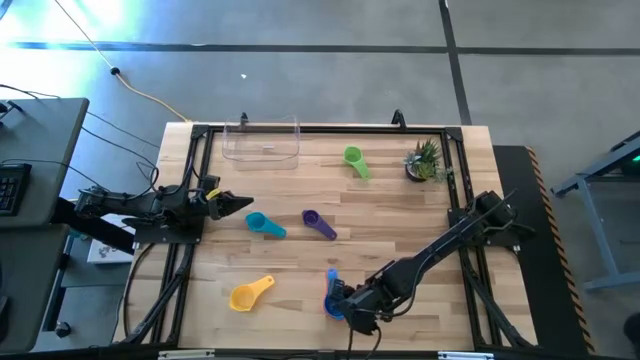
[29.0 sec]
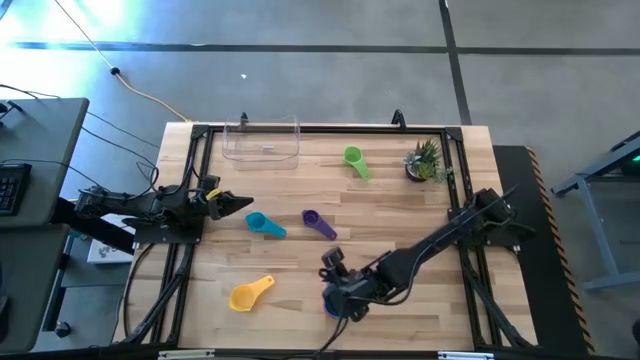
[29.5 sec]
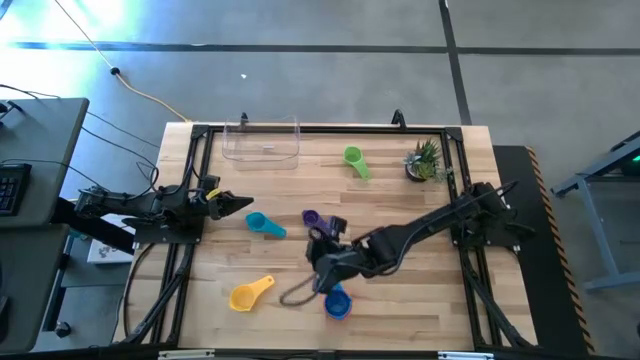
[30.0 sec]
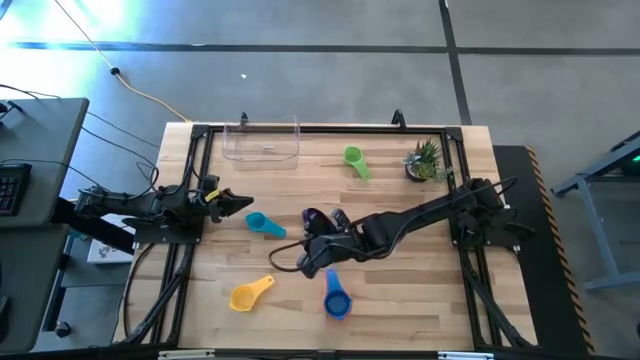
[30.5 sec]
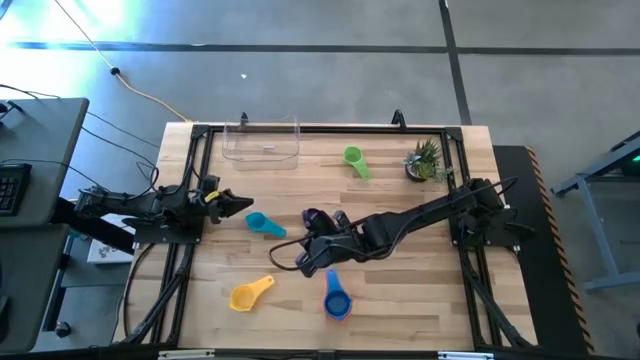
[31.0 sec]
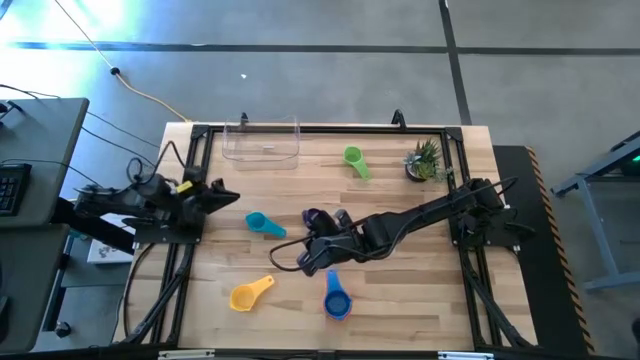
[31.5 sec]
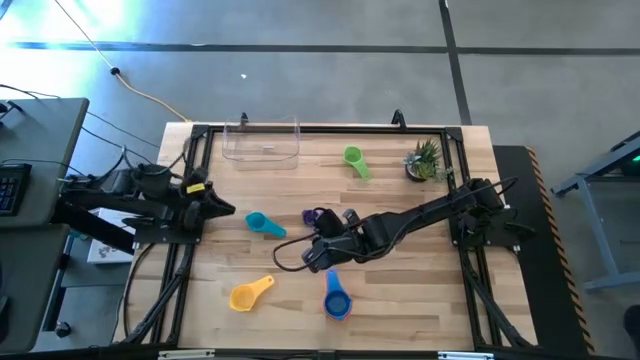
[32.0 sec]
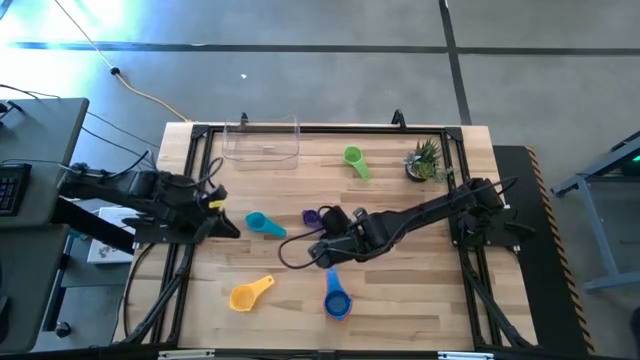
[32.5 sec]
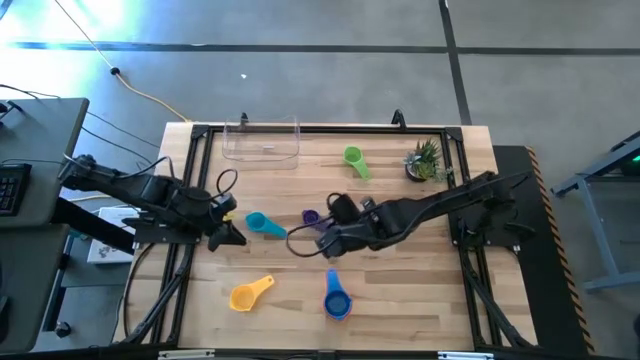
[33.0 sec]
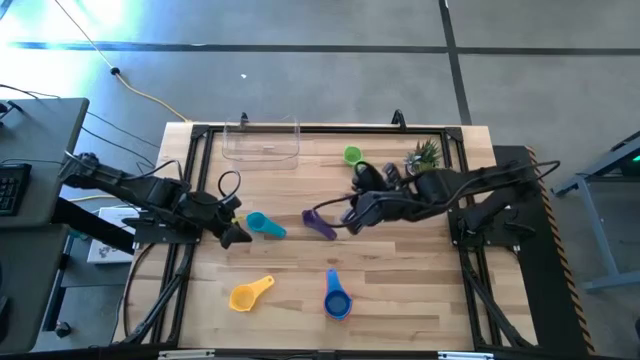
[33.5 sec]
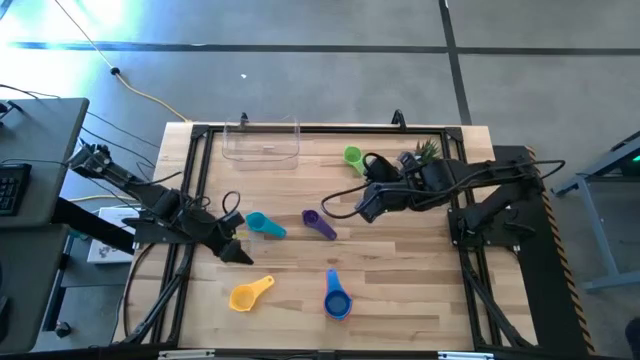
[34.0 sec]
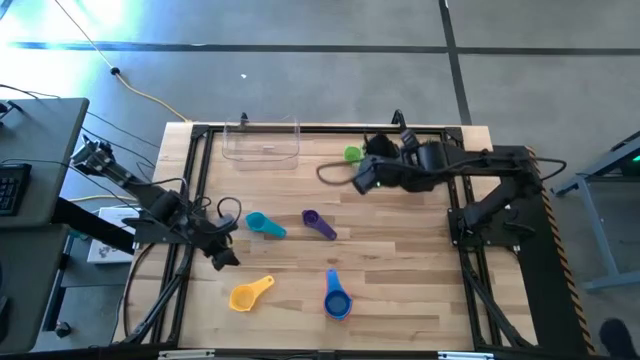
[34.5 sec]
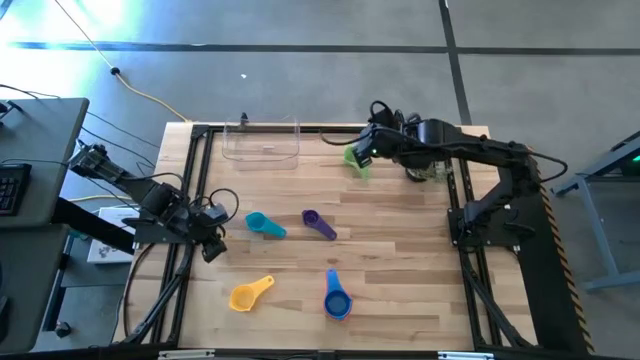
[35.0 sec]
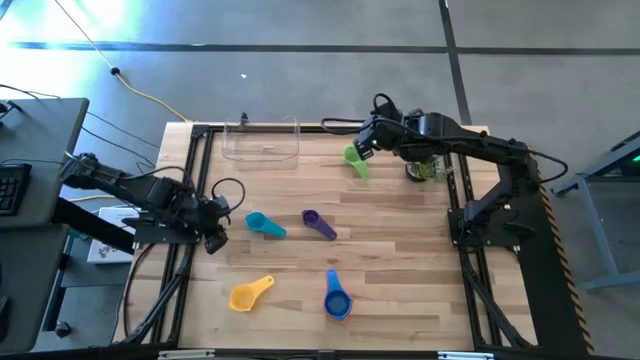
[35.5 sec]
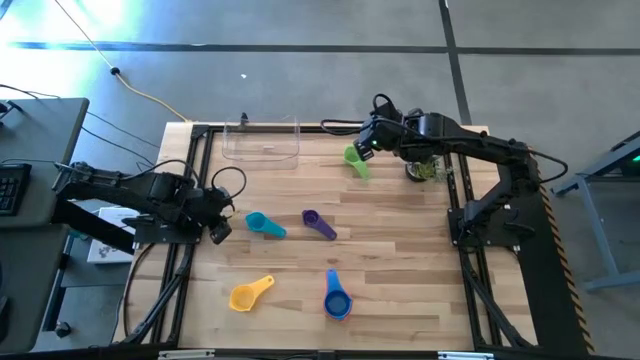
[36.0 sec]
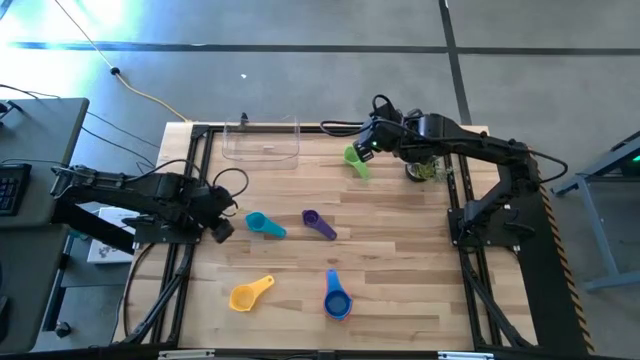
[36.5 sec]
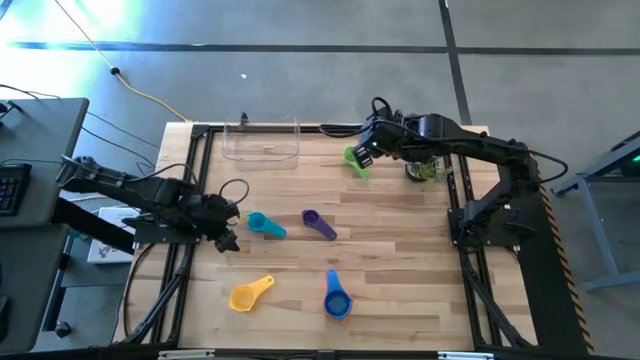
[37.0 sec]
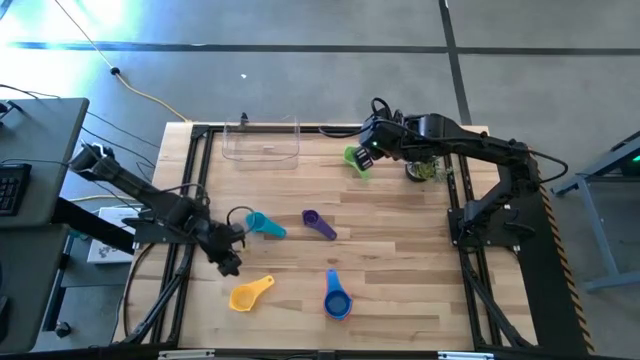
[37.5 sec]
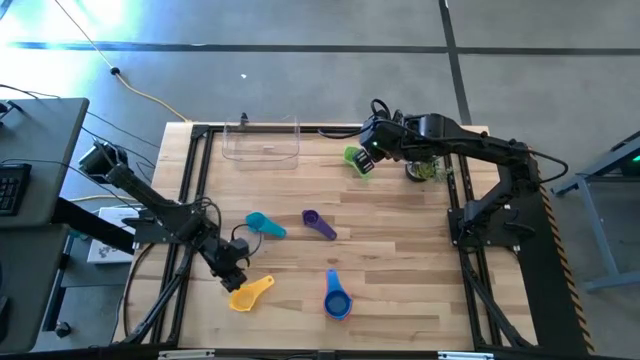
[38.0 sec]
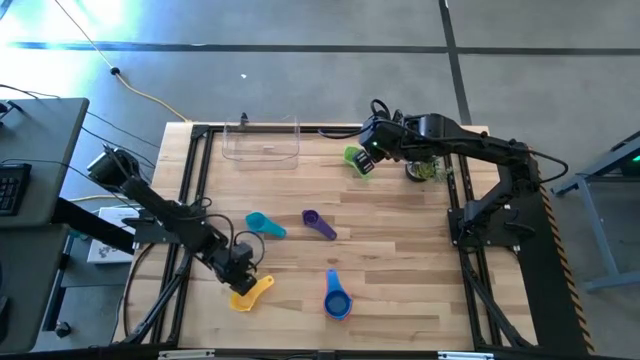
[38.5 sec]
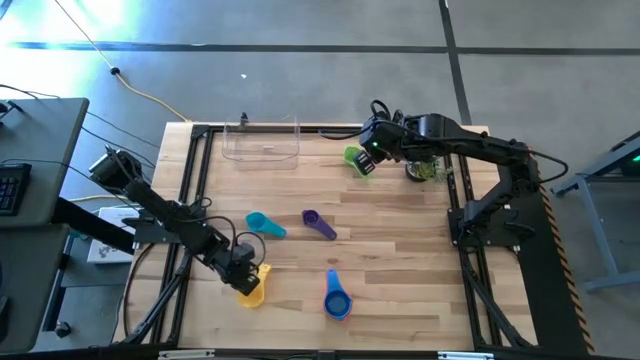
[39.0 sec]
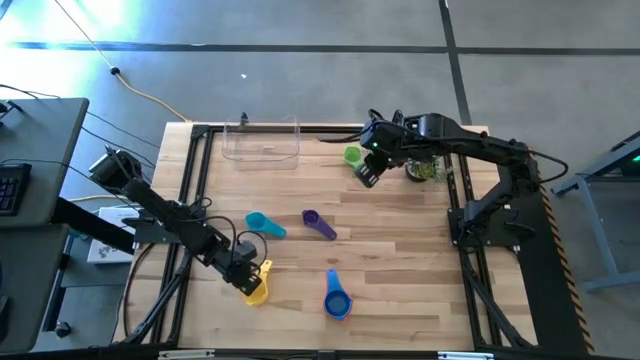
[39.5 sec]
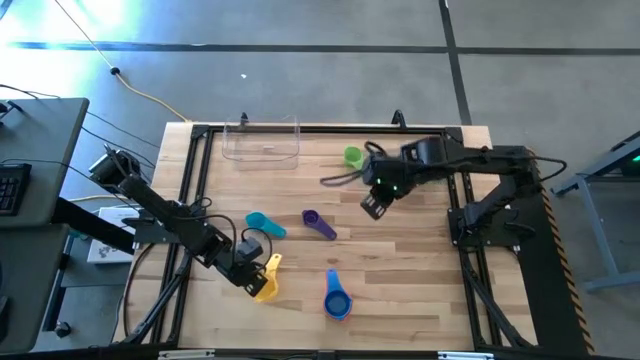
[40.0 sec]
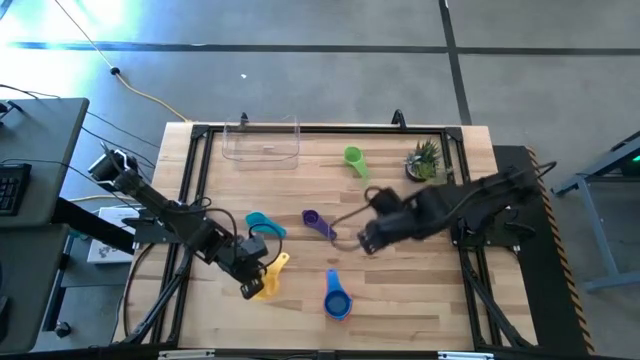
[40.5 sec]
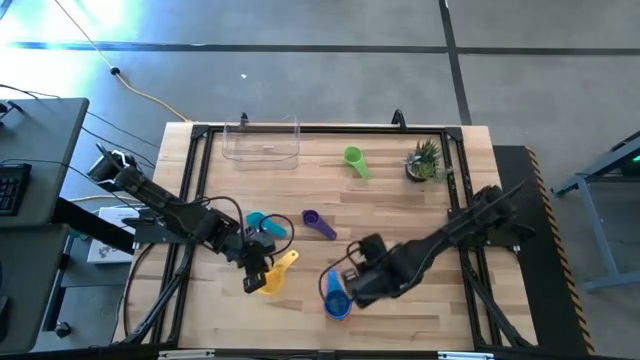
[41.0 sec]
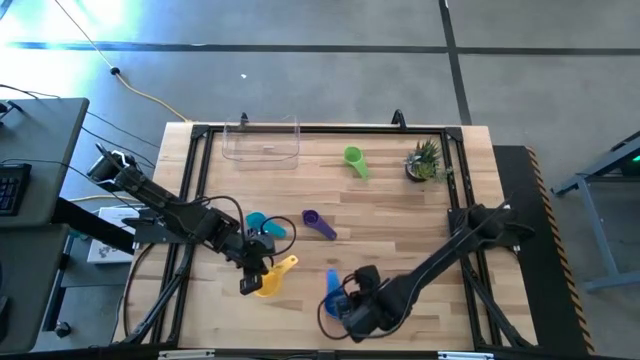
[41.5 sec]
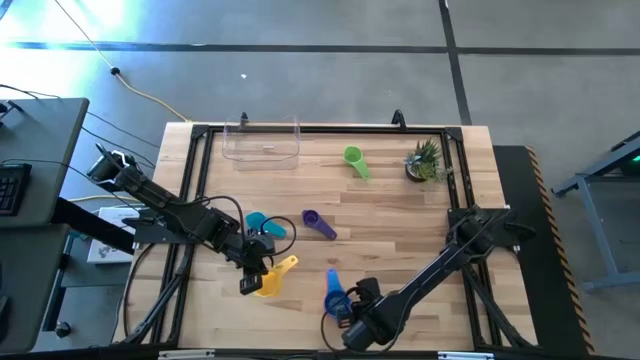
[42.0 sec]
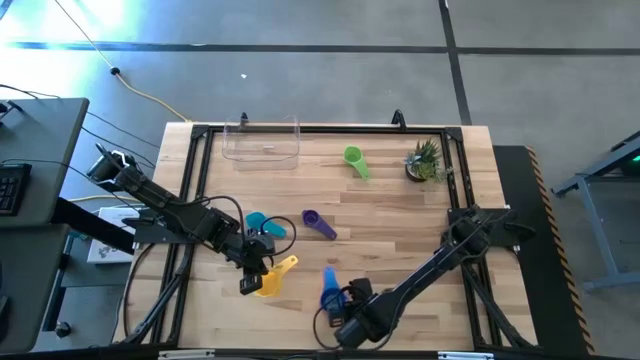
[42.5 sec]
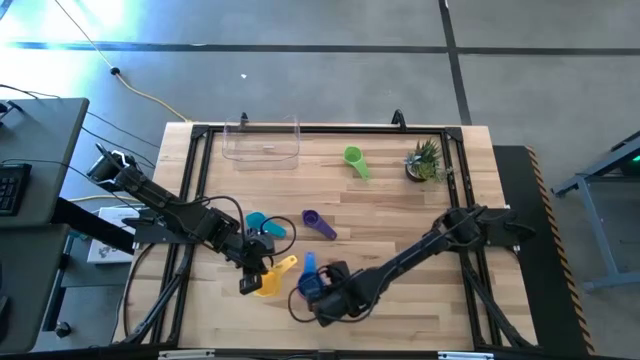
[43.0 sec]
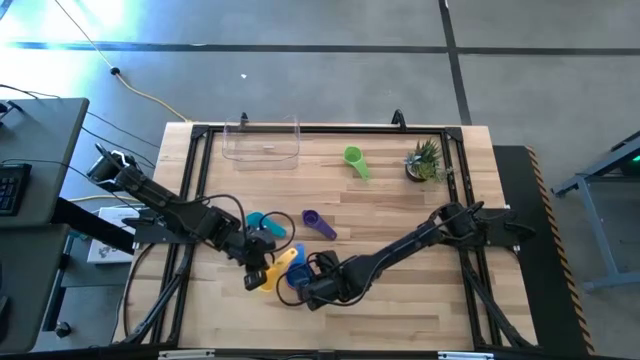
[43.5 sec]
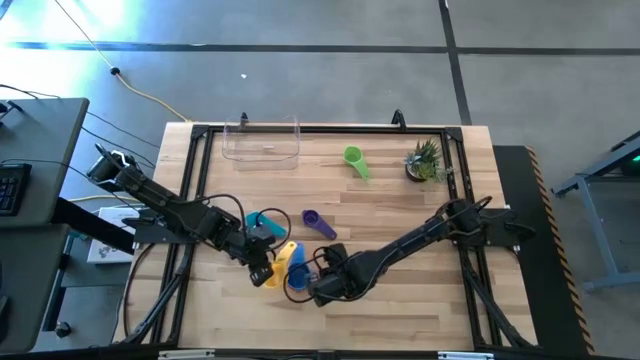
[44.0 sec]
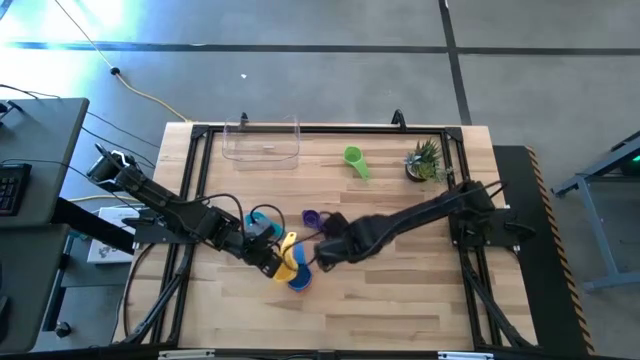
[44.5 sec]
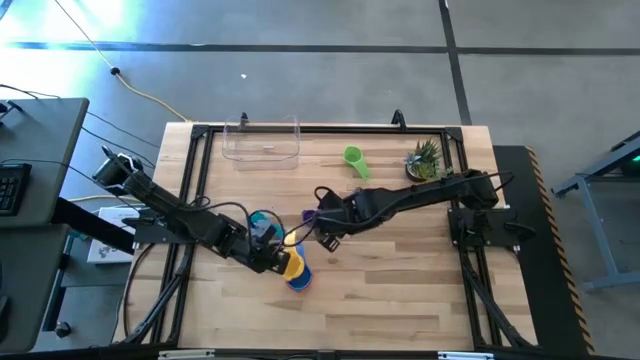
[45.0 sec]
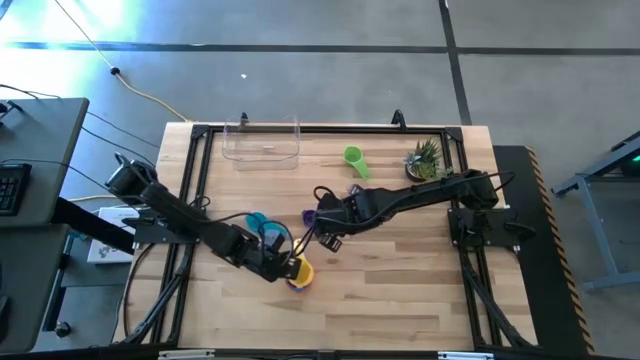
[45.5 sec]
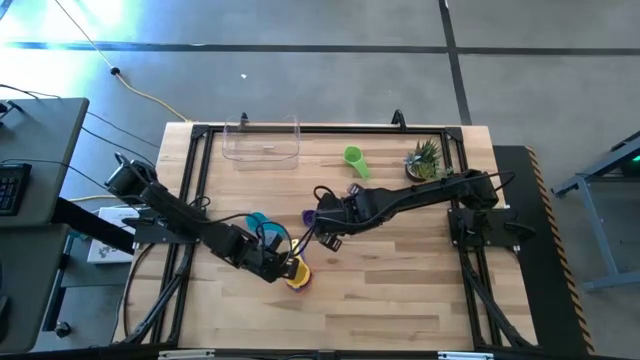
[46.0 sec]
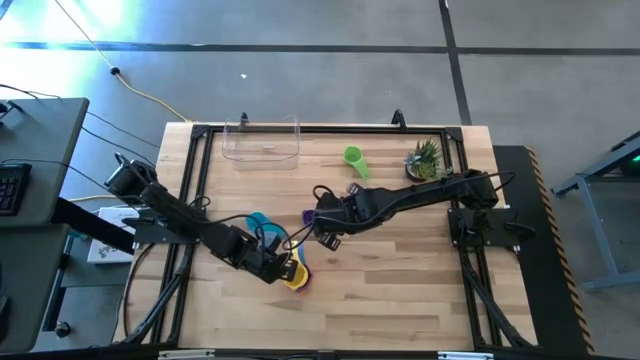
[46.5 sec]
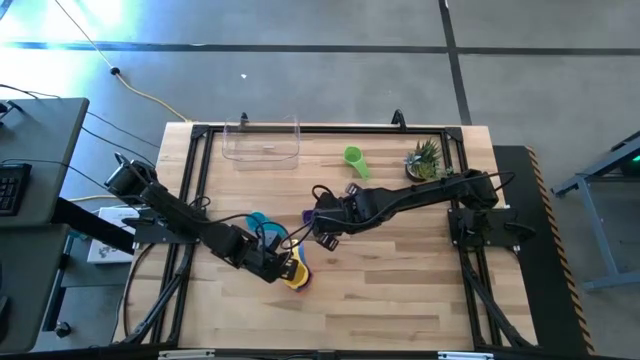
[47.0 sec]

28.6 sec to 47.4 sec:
Task: Nest measuring cups in basket
Stack the yellow measuring cup on the blue measuring cup

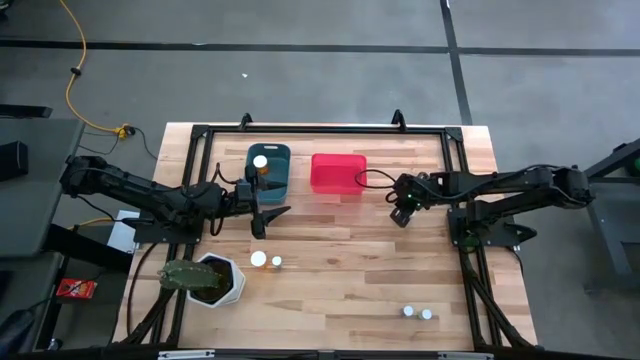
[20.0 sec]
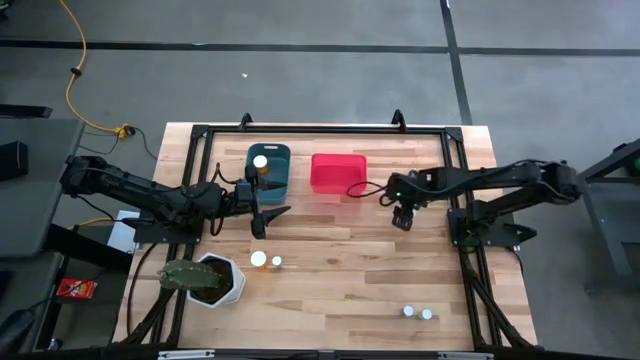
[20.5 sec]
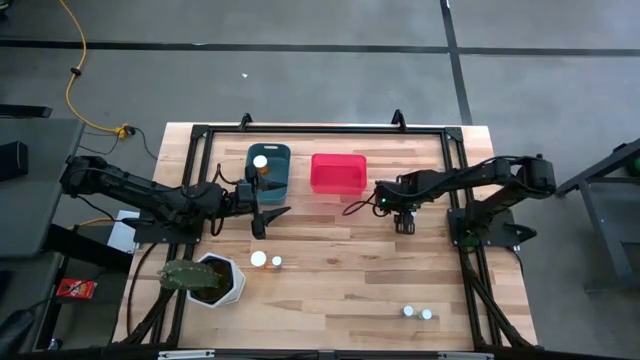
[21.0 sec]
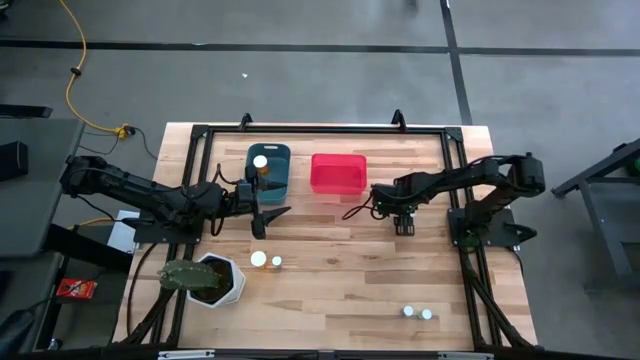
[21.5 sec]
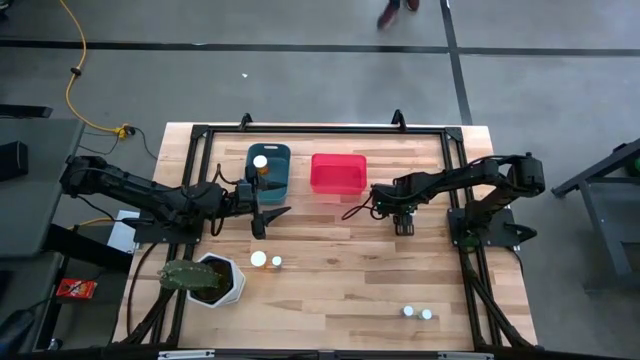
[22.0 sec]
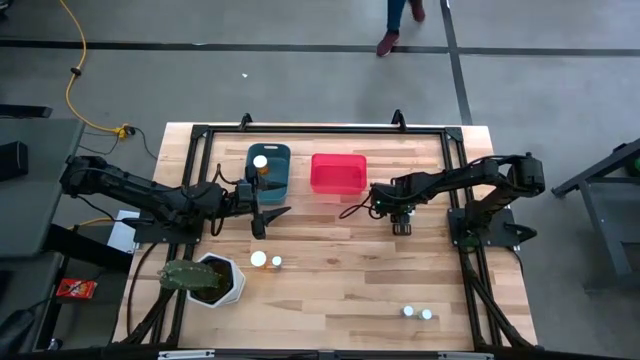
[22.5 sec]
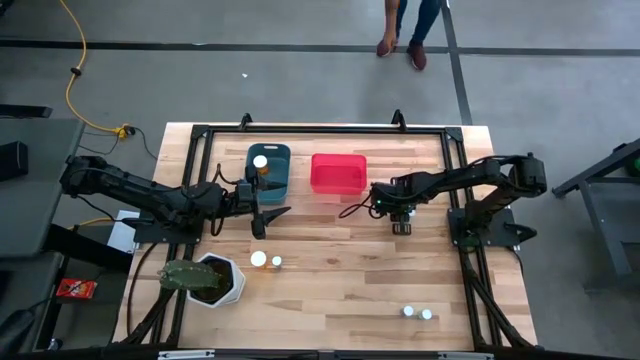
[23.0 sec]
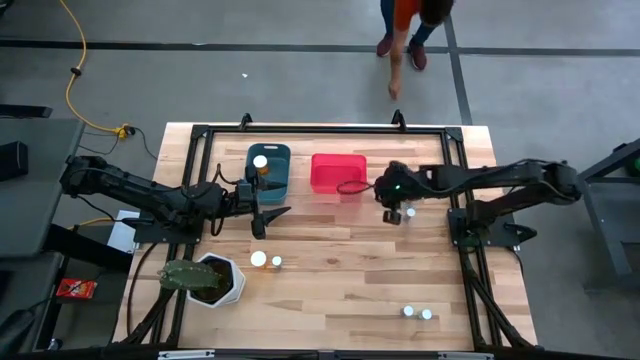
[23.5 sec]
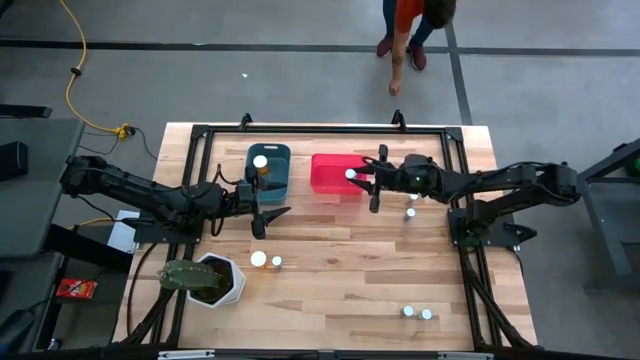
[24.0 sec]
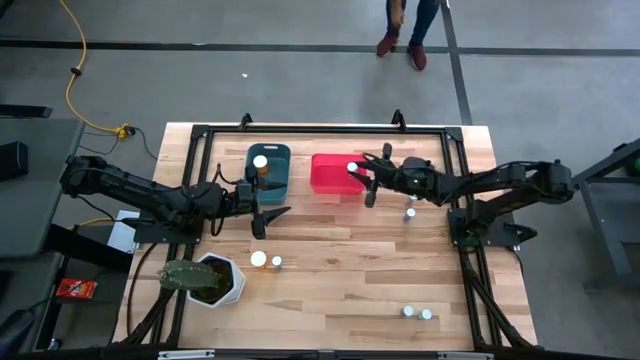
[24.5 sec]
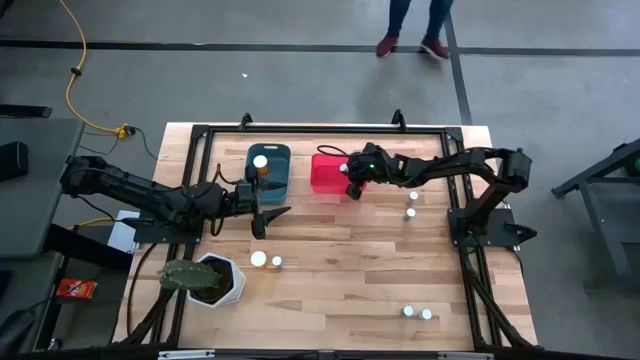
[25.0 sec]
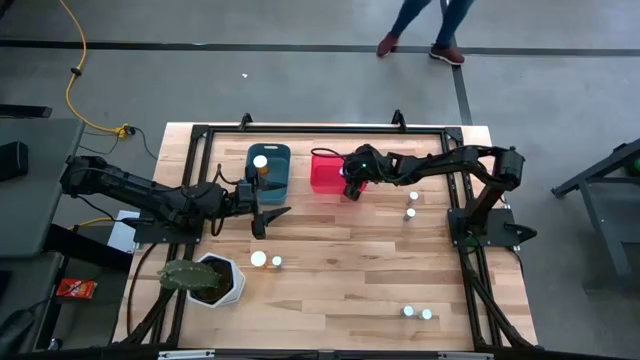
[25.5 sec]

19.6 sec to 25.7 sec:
Task: Pick and place medicine bottles into bin by pill shape (circle, oval)
Put the top green tablet bottle into the red bin
